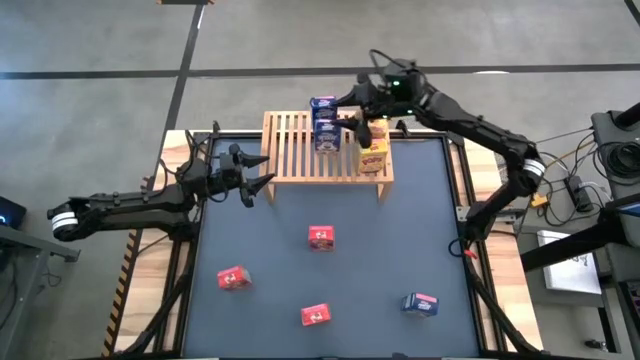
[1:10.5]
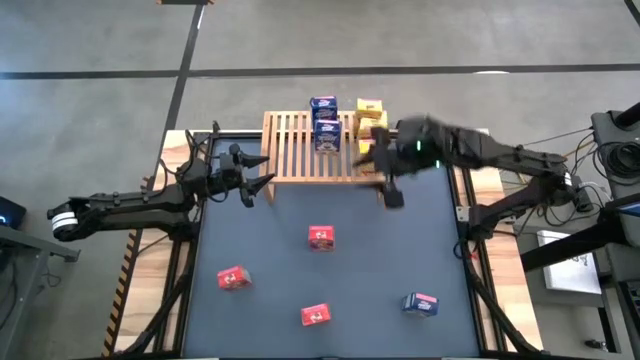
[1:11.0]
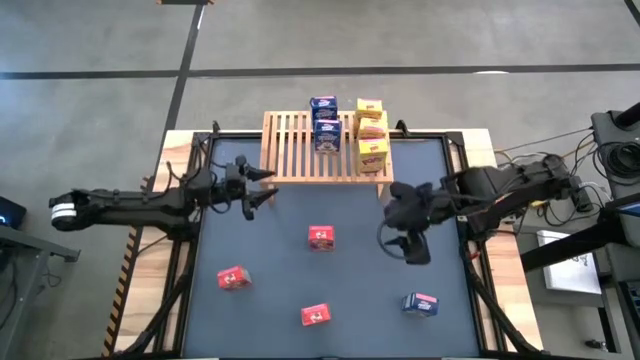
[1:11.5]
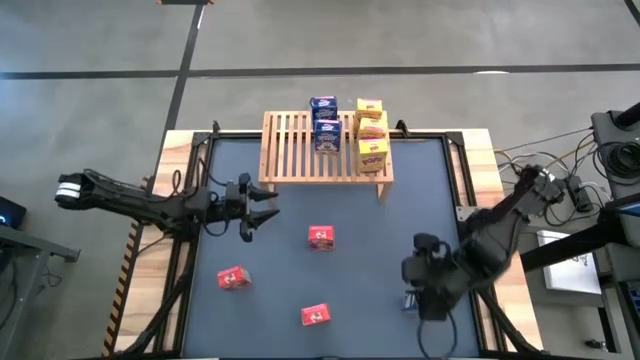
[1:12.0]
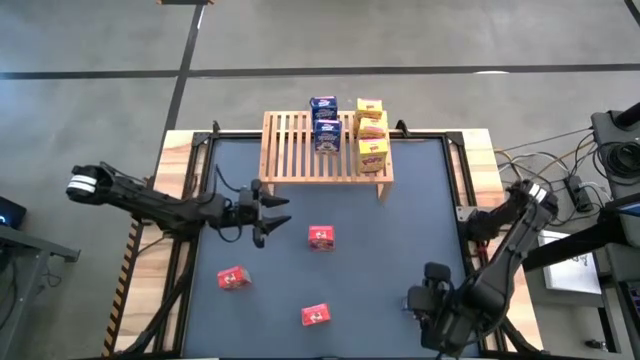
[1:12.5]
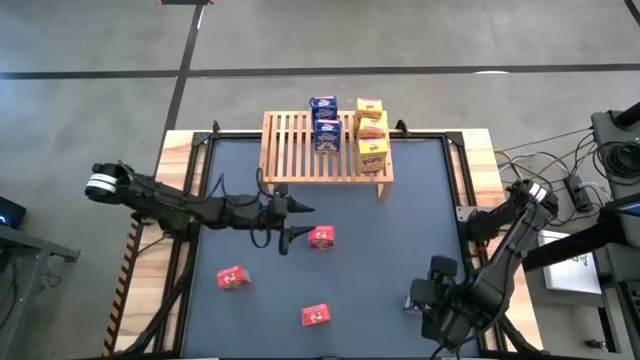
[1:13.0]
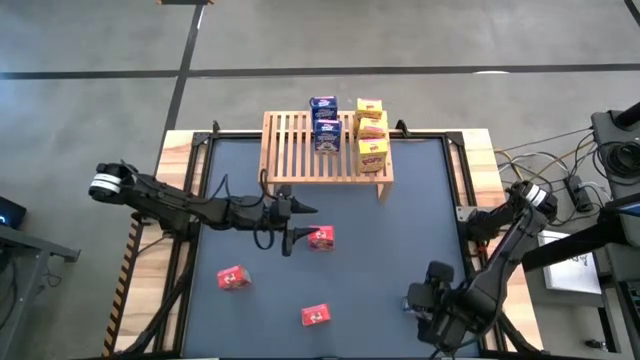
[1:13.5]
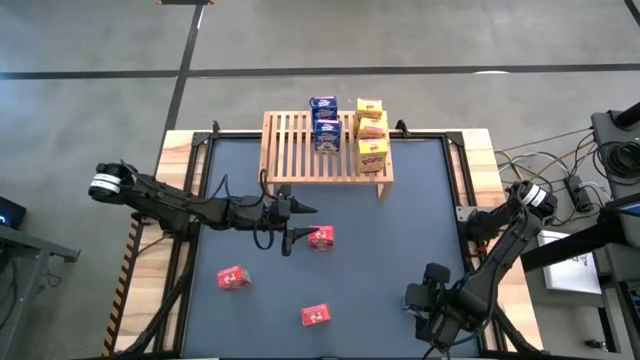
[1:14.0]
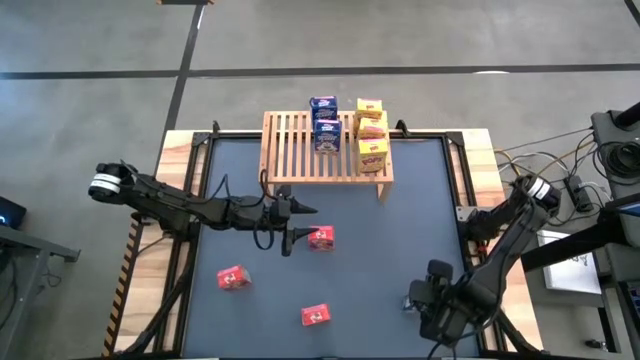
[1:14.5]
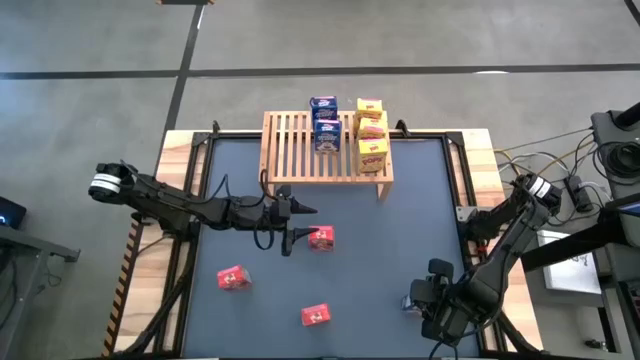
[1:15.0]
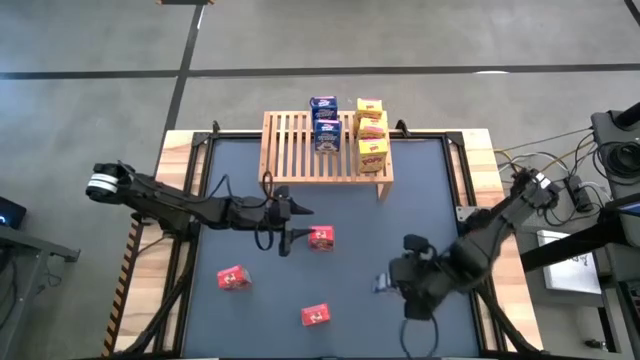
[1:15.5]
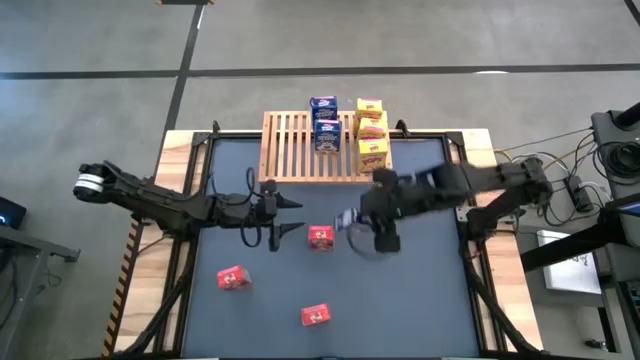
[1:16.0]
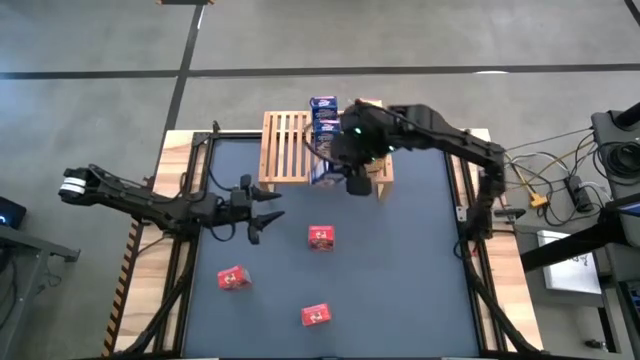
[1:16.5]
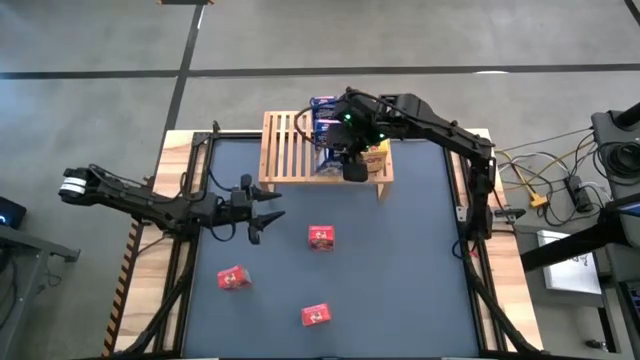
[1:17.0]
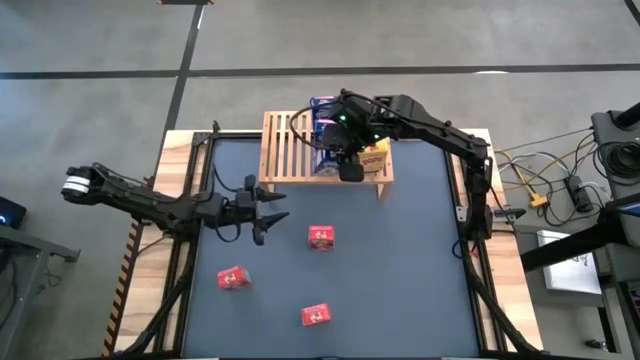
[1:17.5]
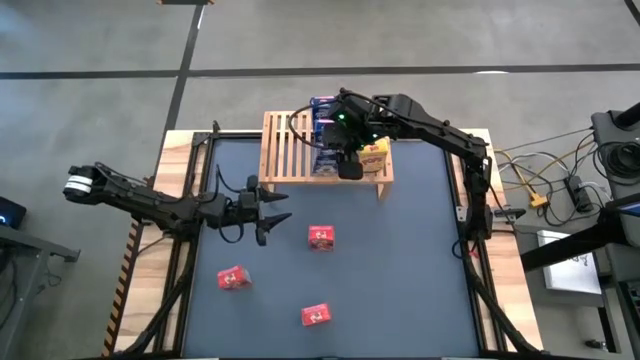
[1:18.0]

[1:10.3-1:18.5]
Task: Stack cereal on shelf
Put the blue cereal box on the shelf aligned with the other blue cereal box

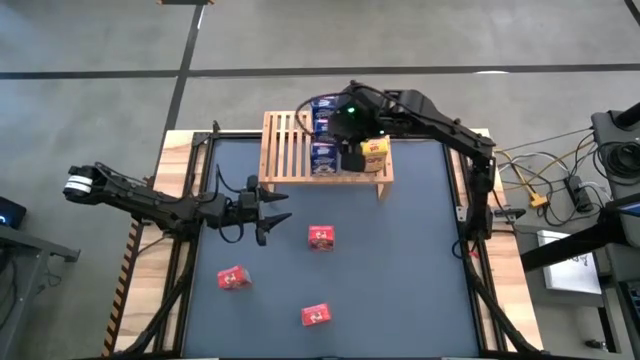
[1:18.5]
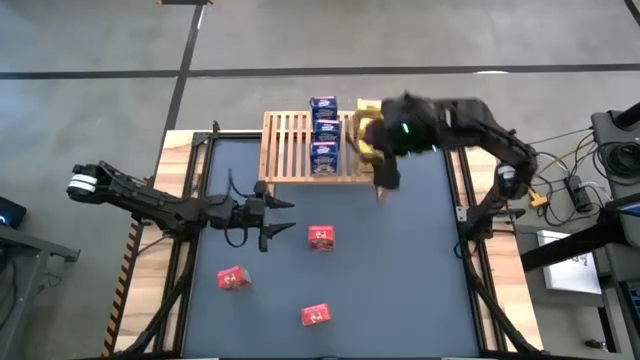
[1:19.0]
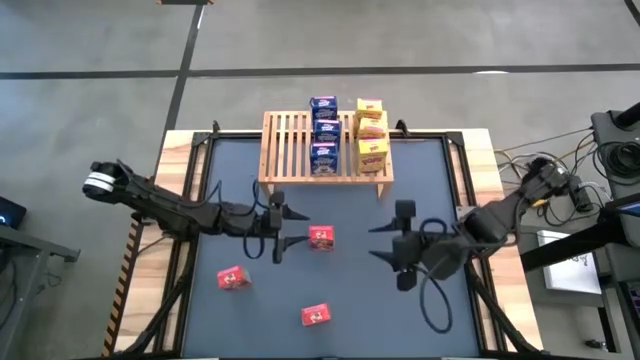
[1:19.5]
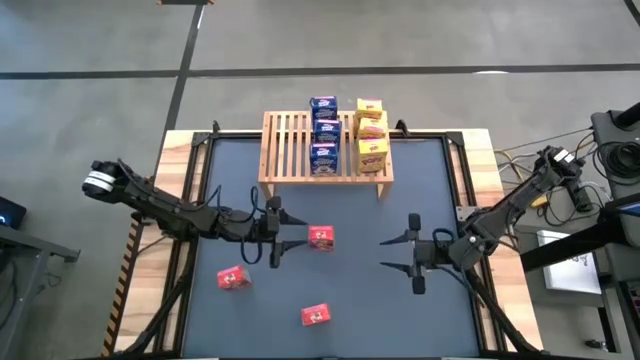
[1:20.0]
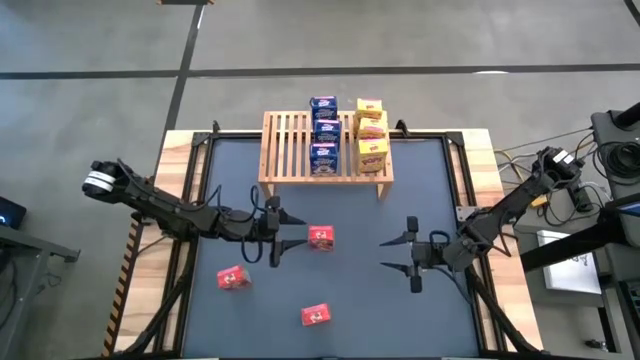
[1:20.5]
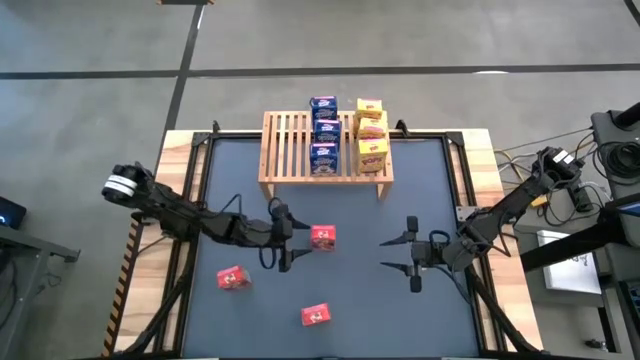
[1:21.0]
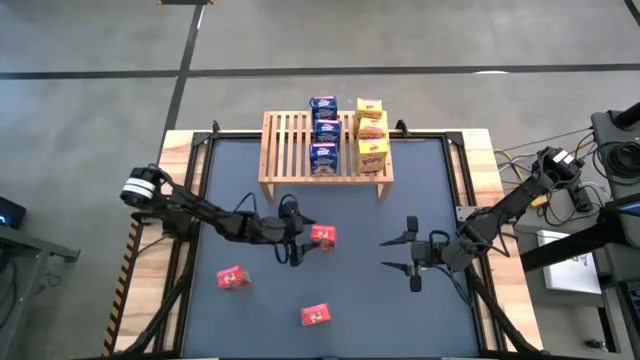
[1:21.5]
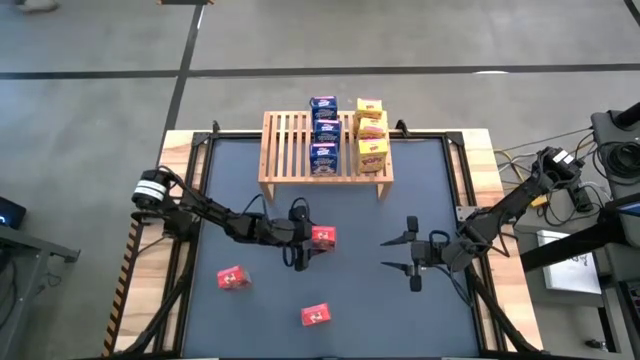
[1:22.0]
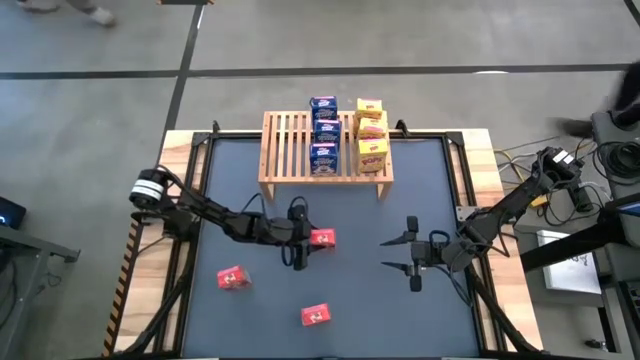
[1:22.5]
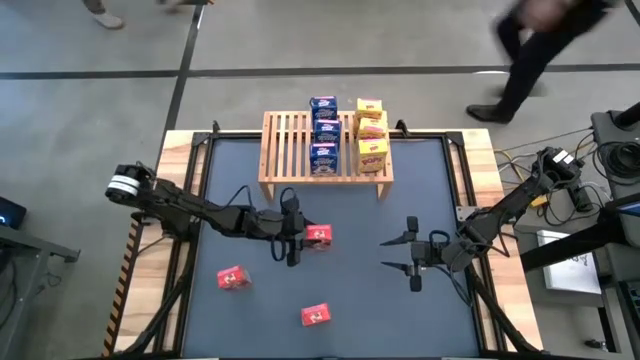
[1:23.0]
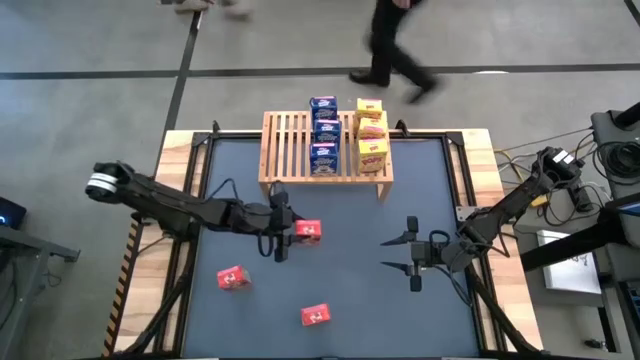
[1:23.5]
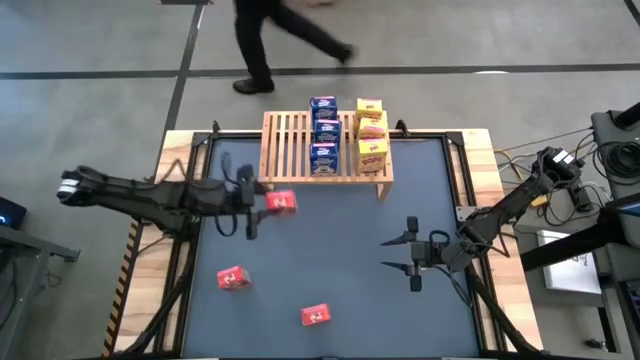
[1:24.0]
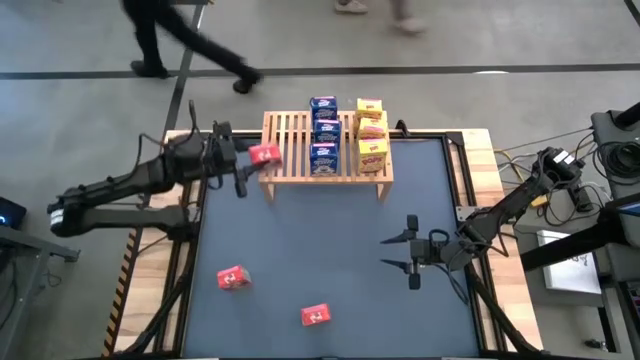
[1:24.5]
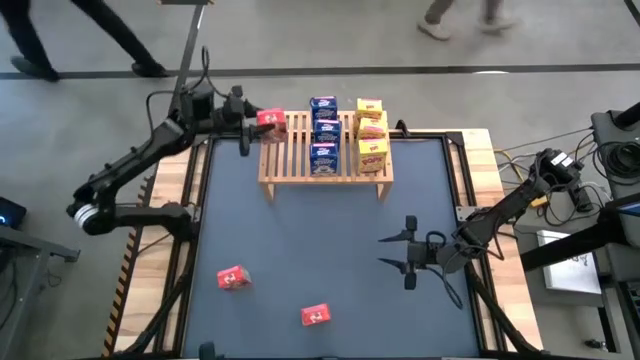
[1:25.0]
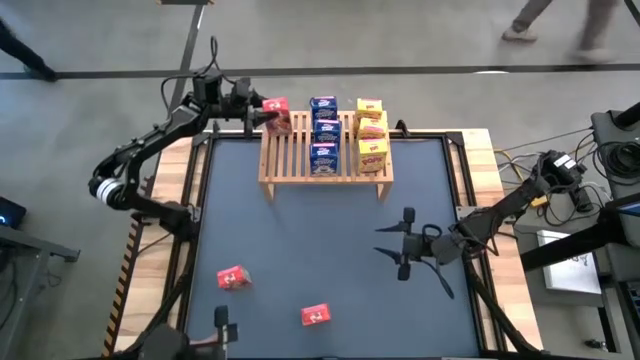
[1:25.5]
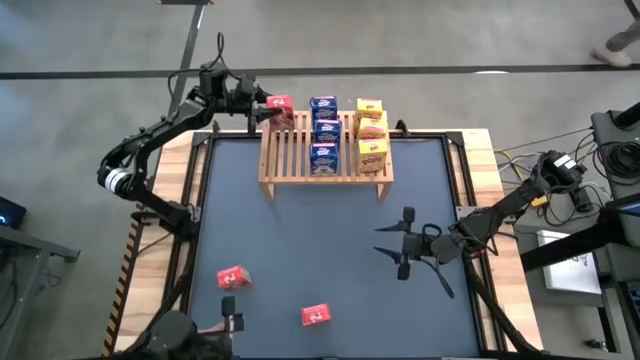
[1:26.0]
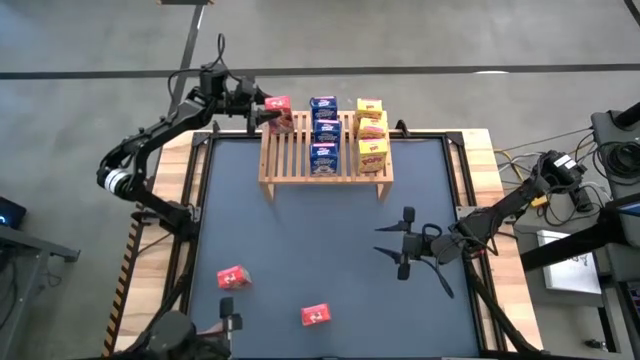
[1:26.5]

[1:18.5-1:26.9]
Put the top red cereal box on the shelf

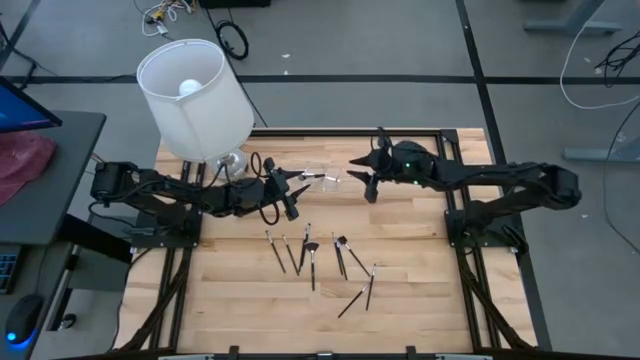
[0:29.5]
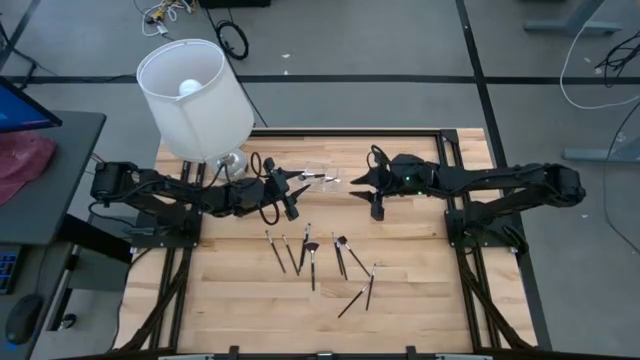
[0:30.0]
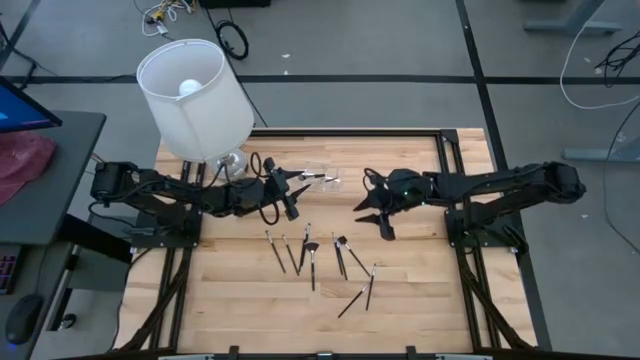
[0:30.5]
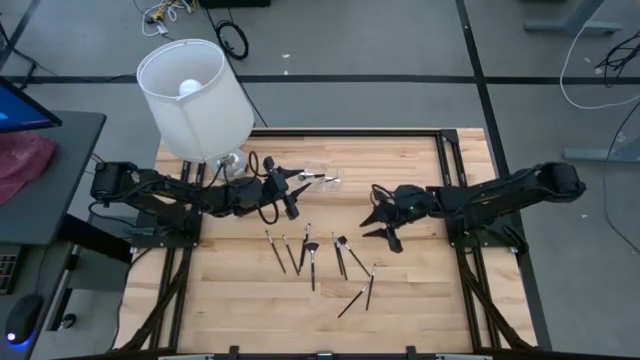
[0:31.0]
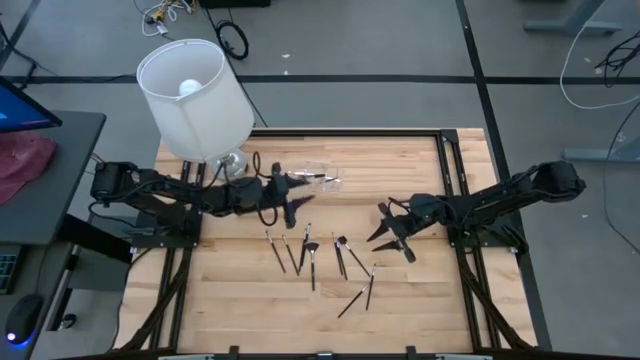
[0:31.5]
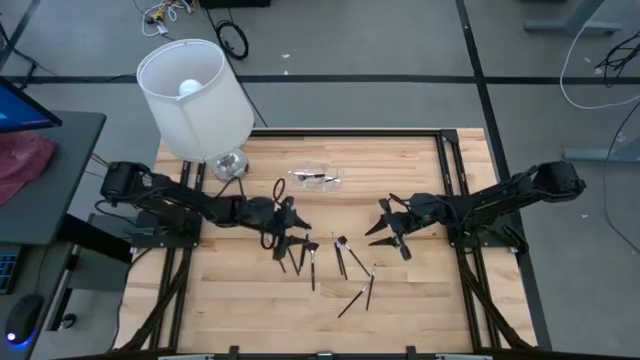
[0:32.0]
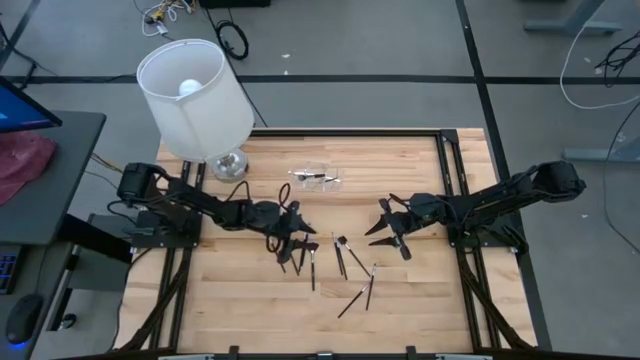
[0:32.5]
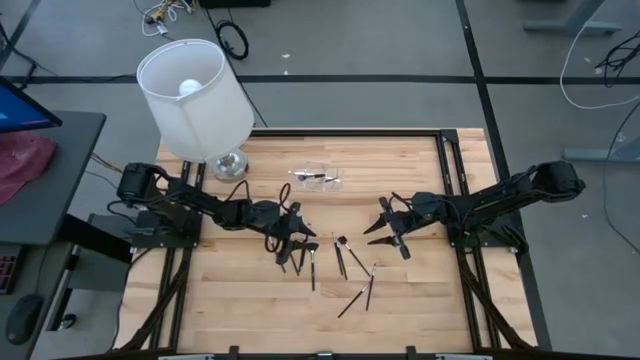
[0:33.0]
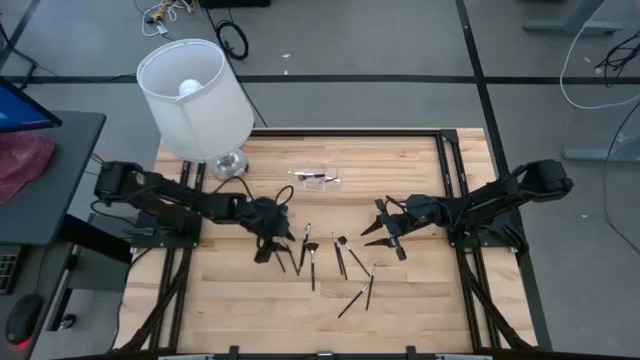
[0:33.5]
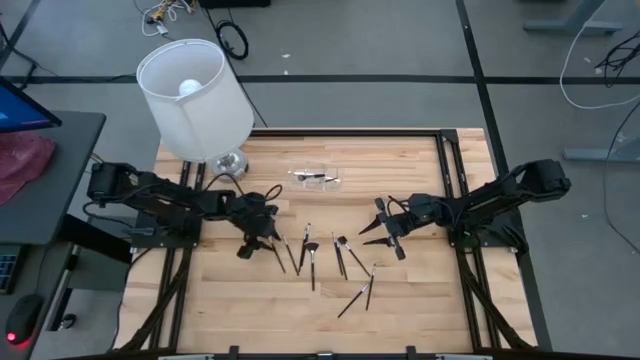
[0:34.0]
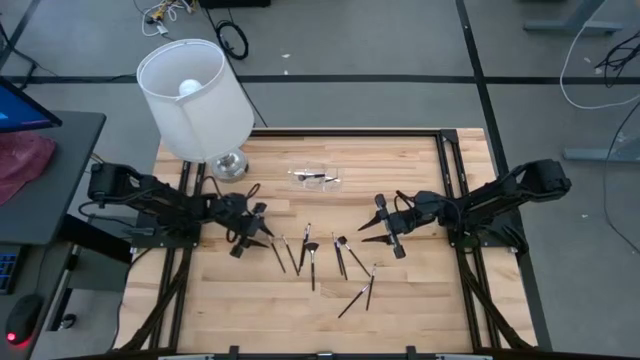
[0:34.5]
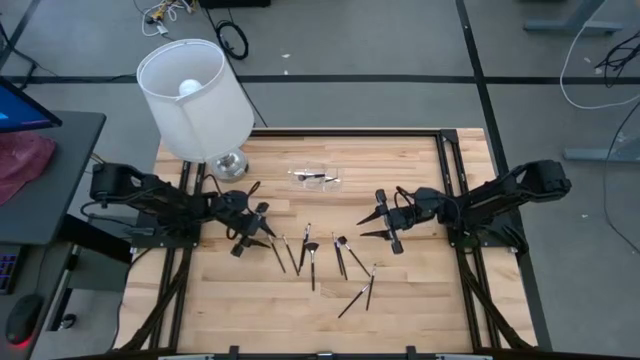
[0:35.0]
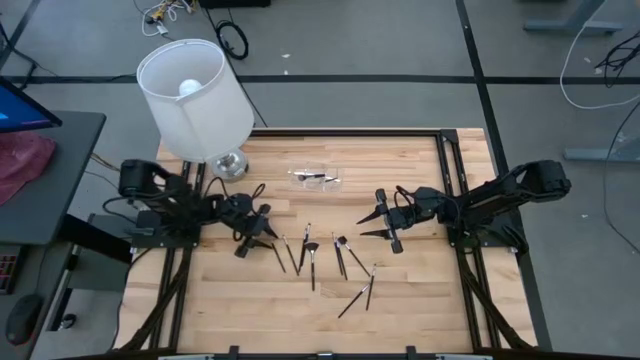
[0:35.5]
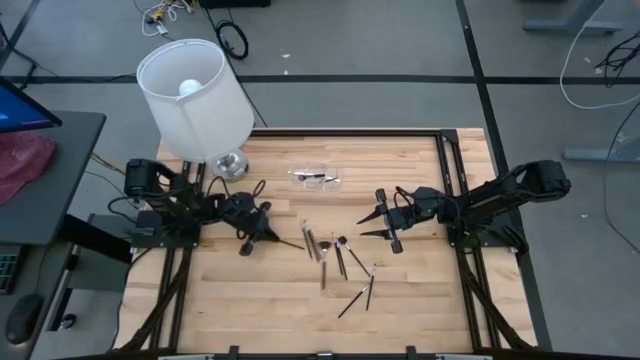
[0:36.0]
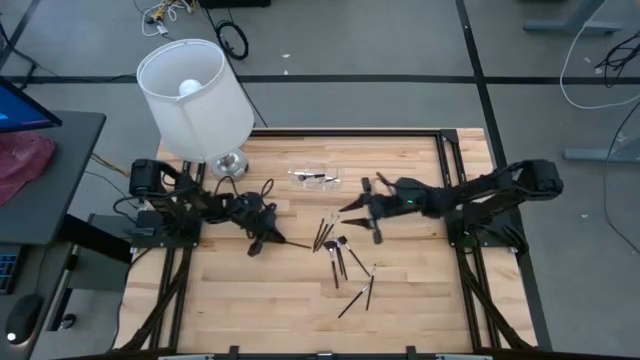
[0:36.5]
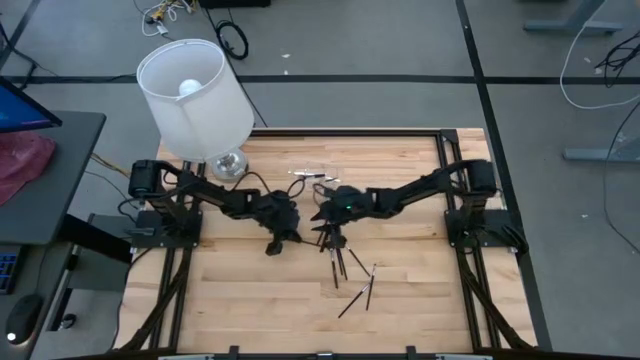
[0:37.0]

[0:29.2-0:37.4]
Task: Put items in baskets/containers
Put the black eyeshadow brush into the transparent organizer
